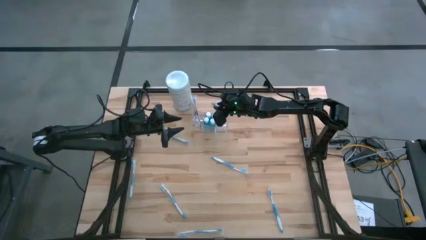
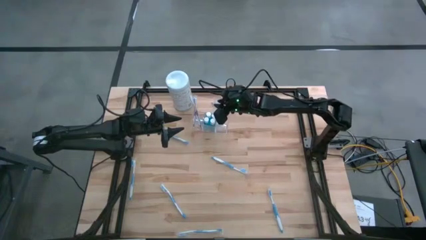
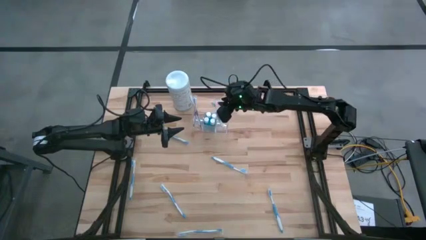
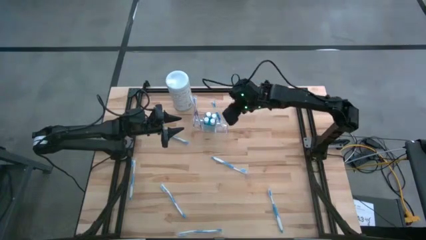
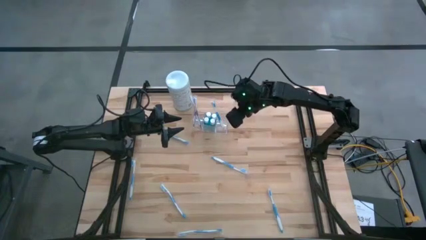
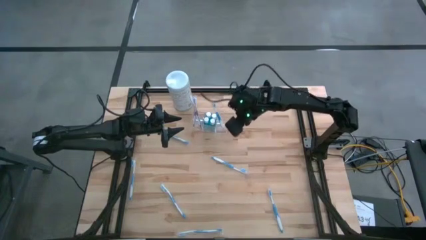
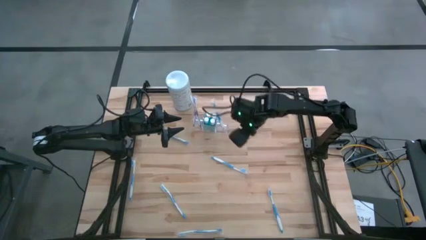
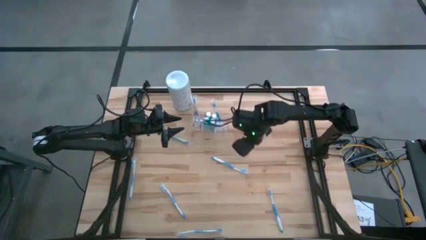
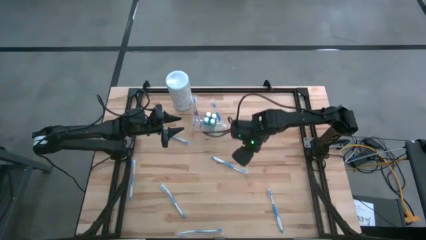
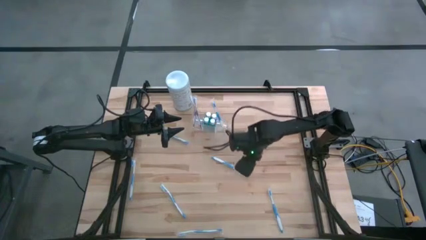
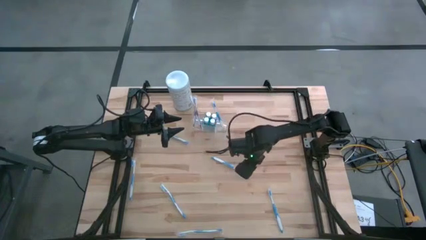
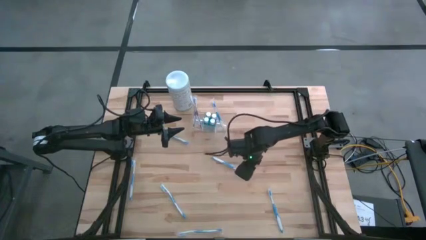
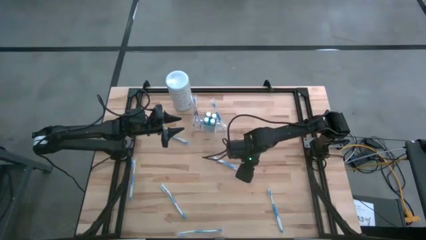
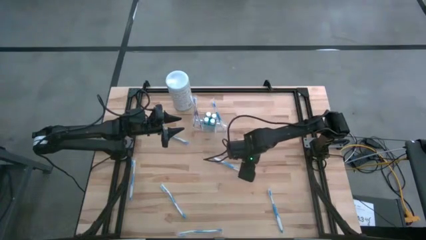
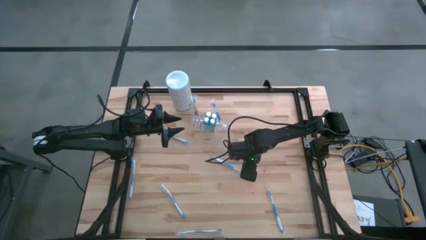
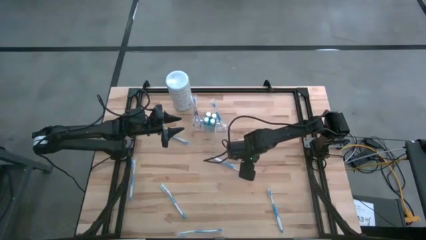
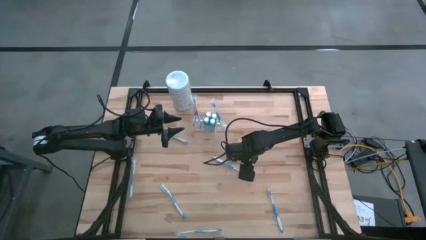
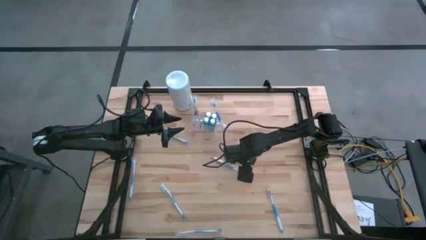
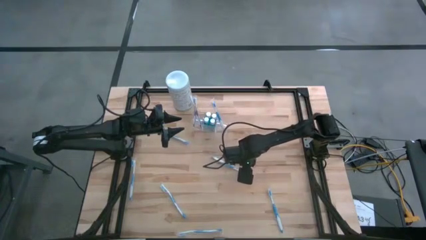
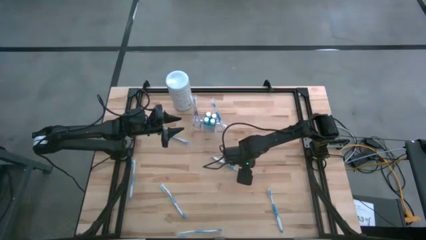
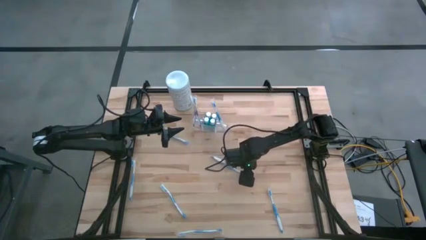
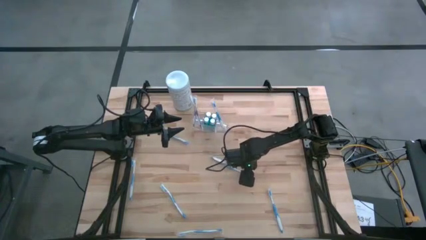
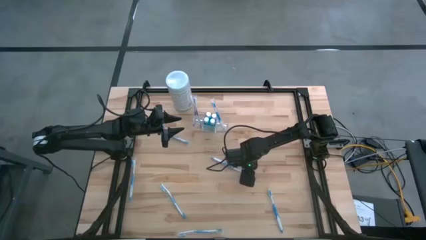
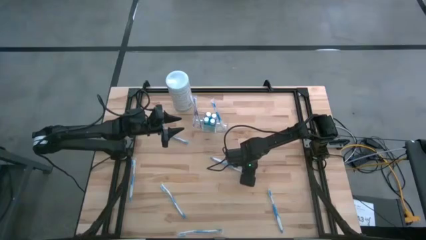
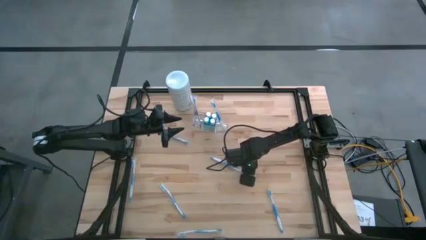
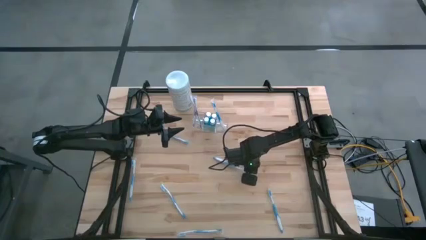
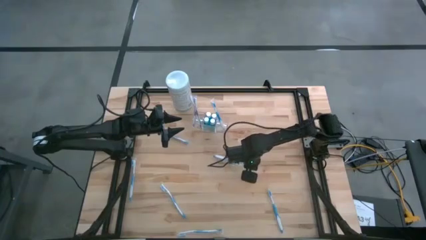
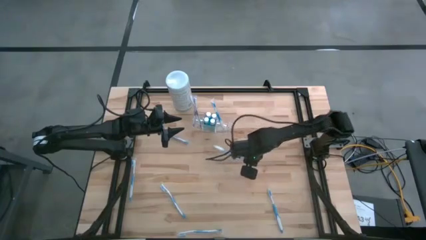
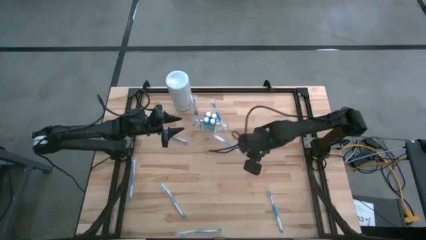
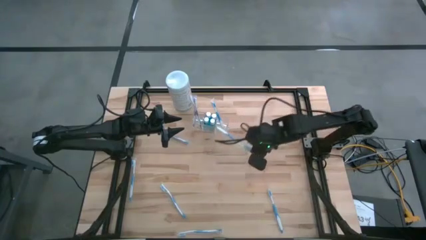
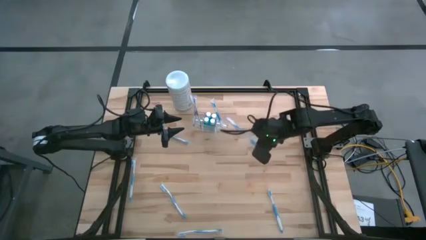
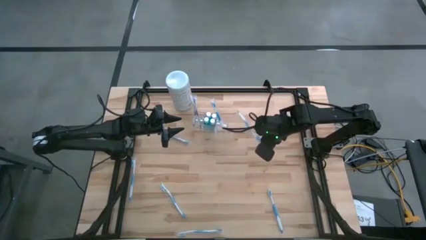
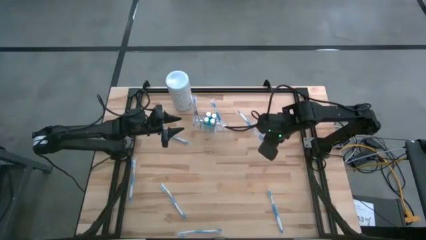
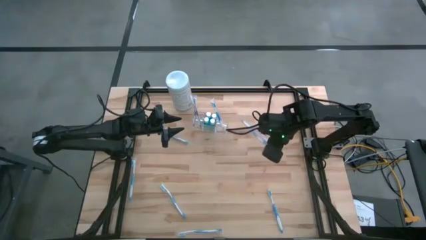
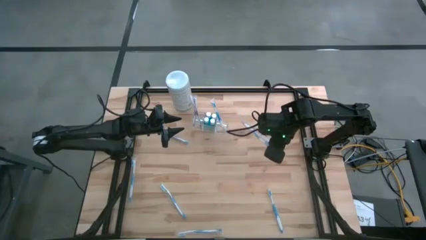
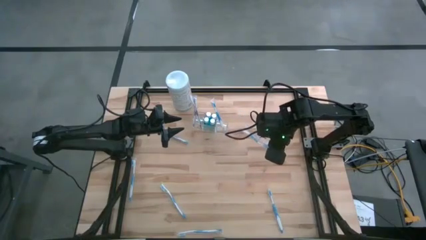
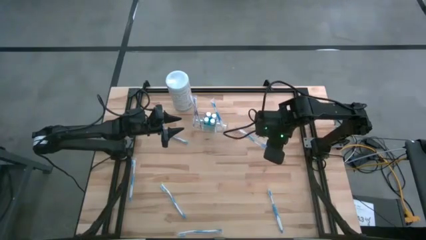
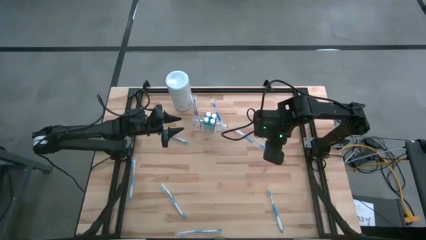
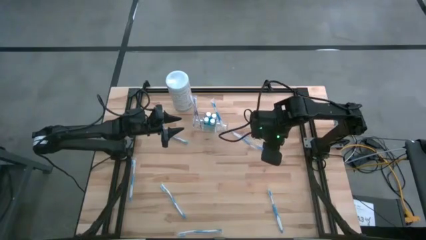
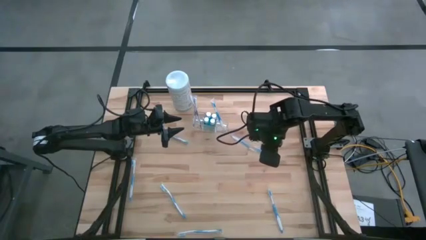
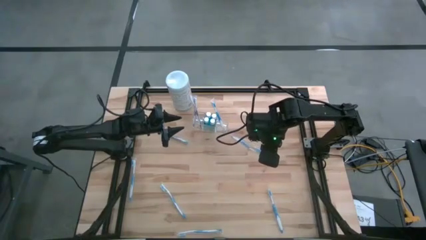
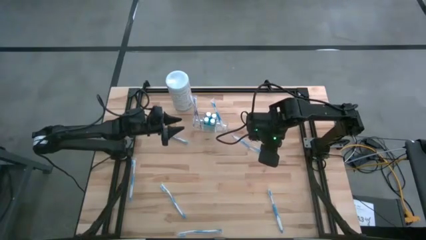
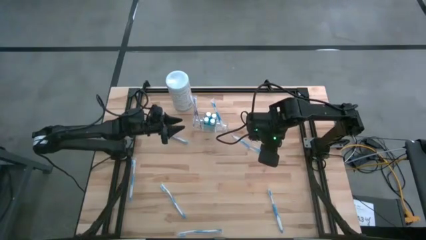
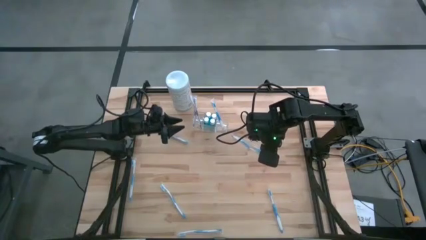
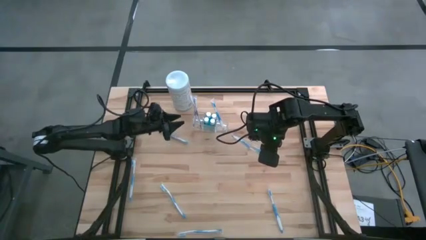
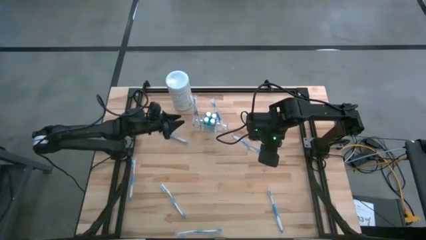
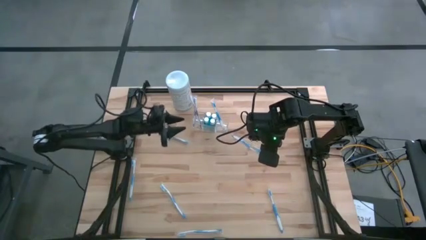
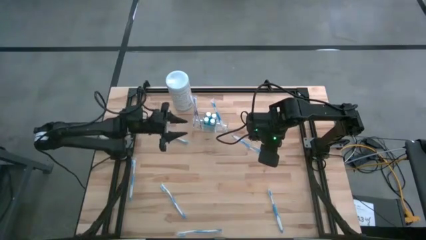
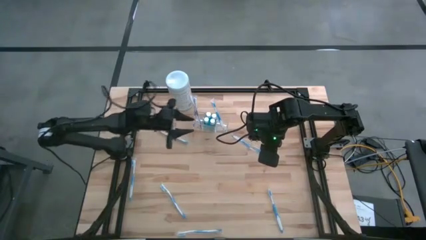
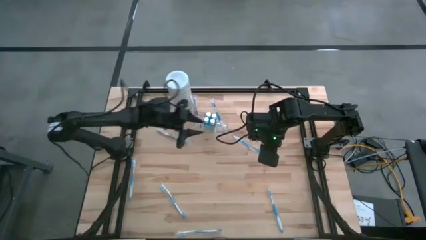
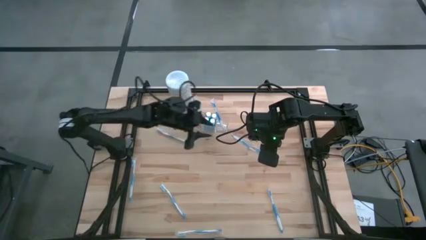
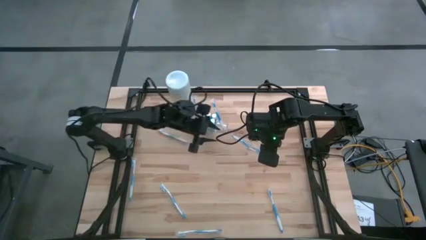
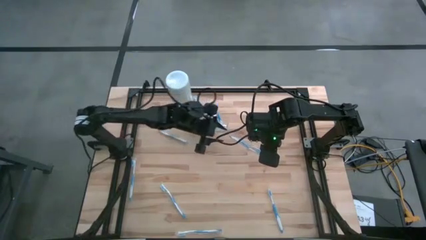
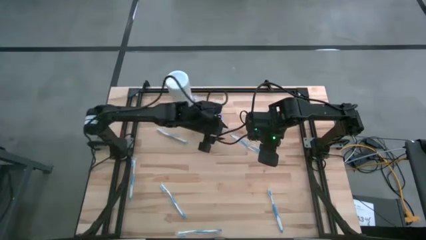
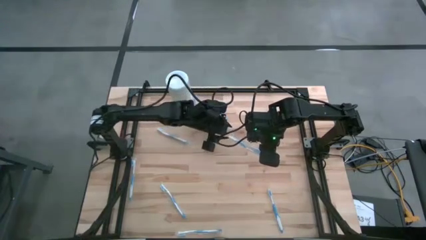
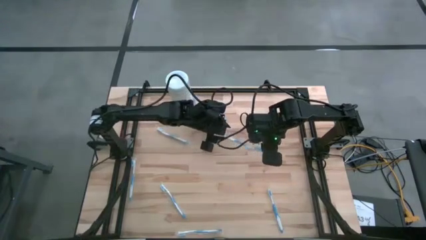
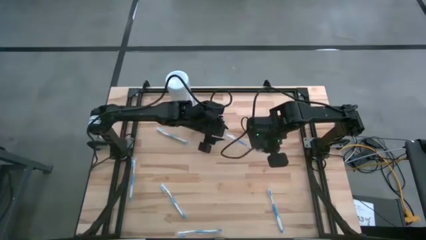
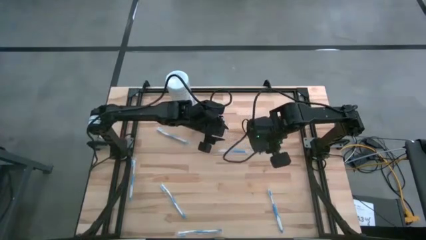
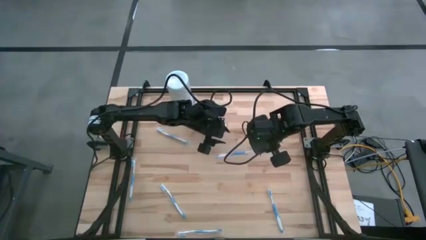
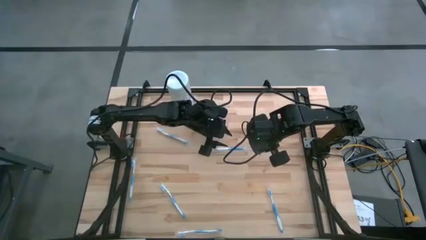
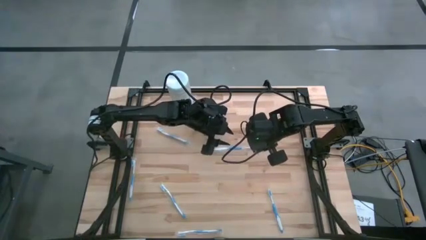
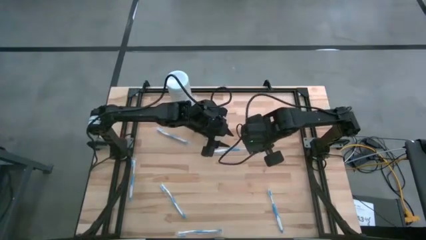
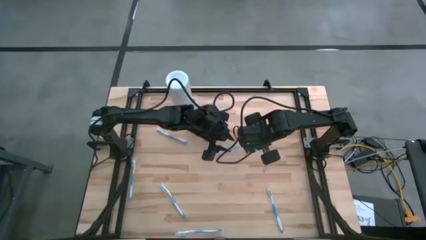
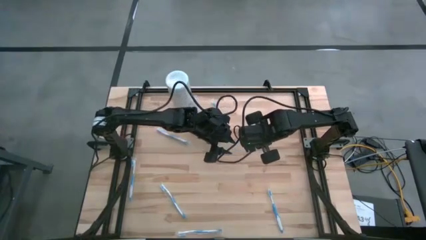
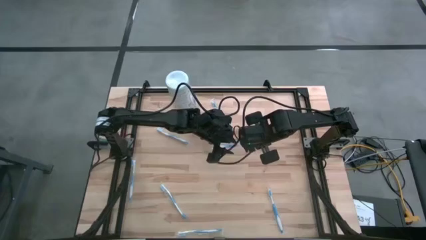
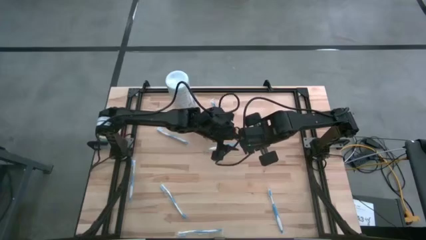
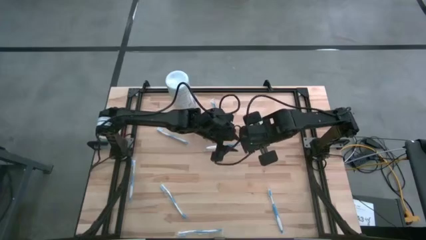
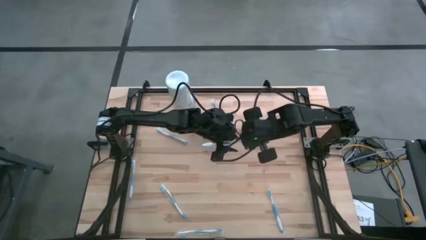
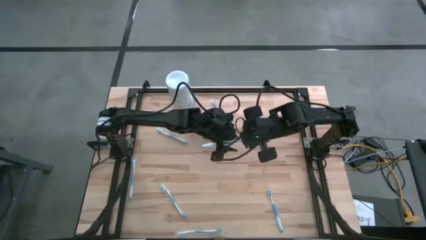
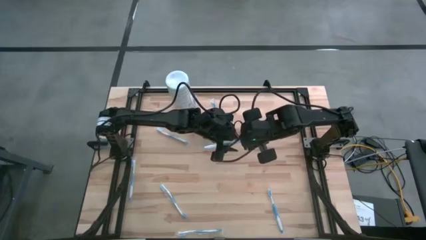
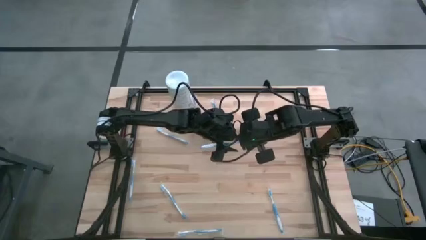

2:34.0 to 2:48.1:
Task: Pick & Place toothbrushing station
Put the blue toothbrush into the right of the transparent organizer

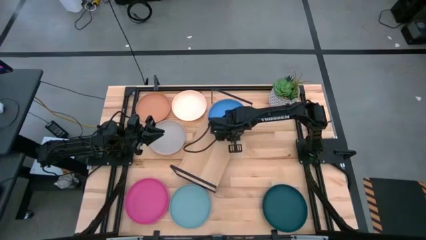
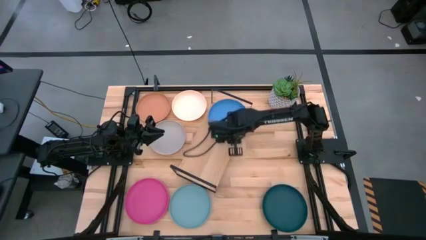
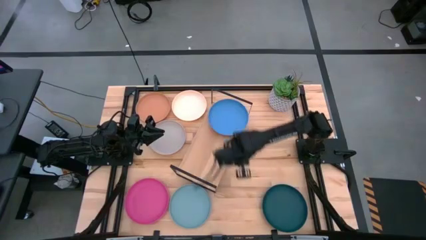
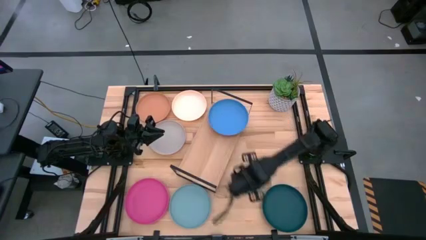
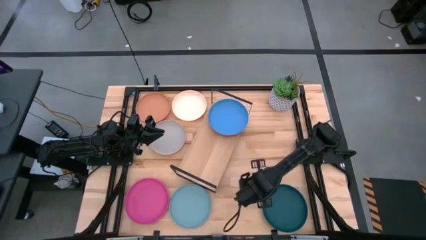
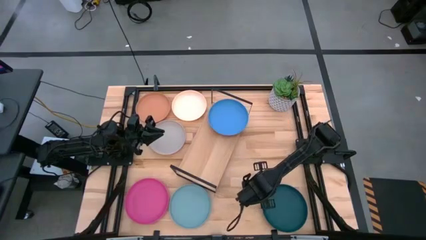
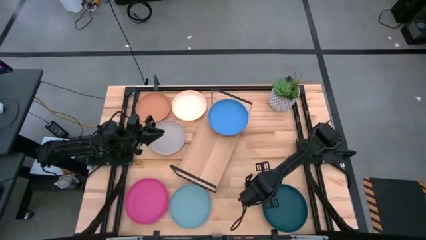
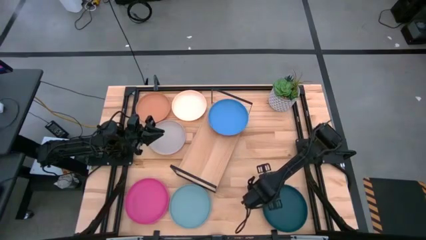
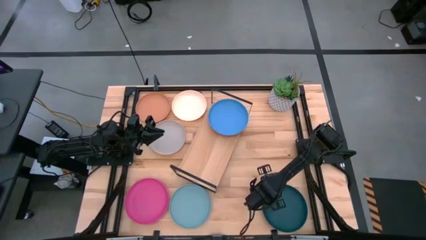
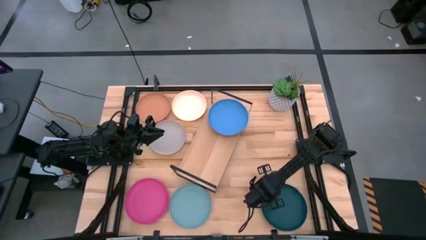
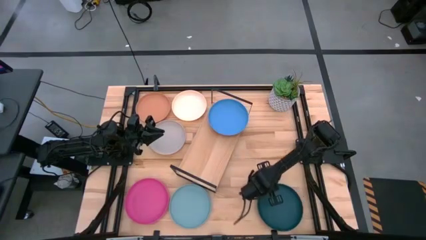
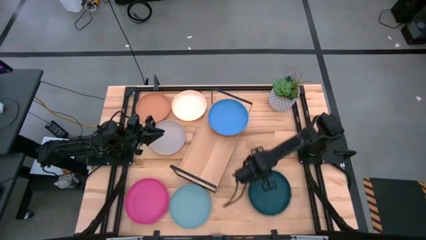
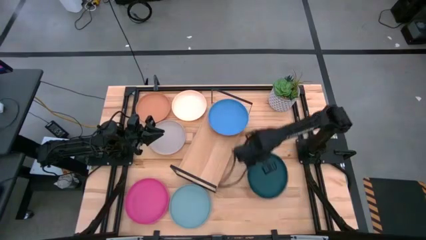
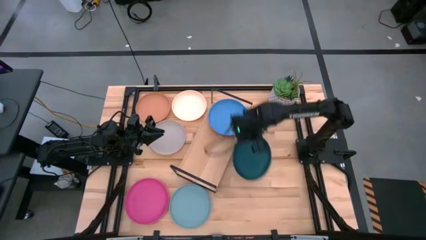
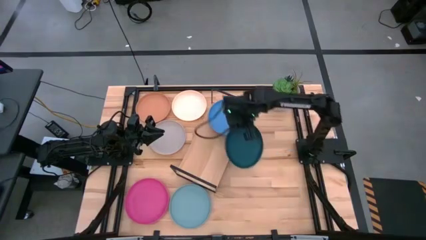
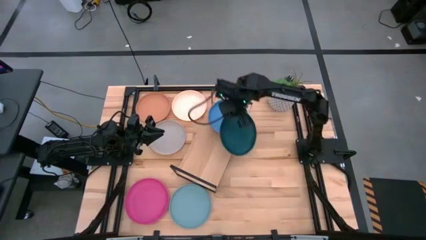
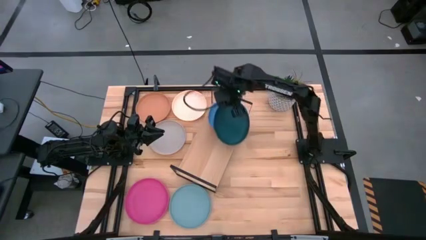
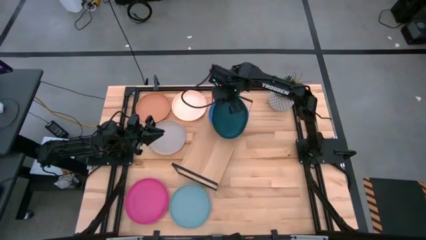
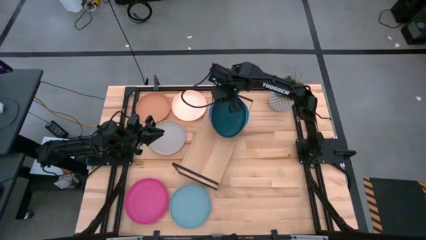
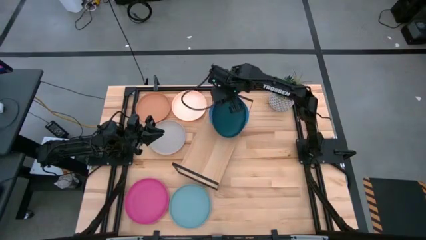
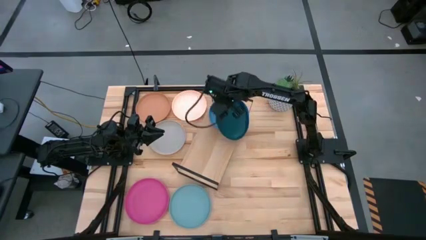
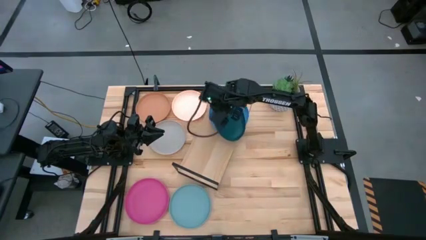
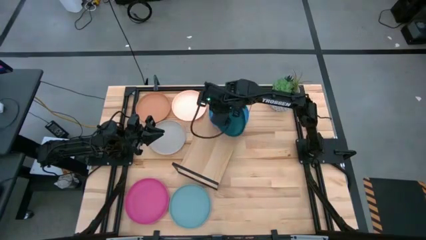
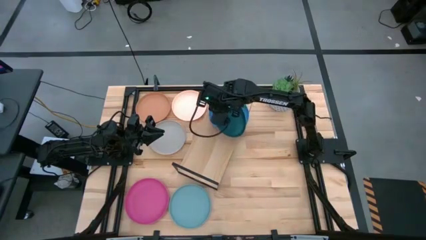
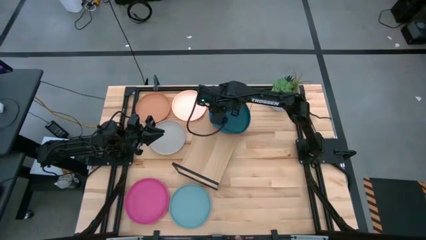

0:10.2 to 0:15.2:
Task: Place and stack plates onto a shelf
Stack the dark blue plate on top of the blue plate on the shelf
